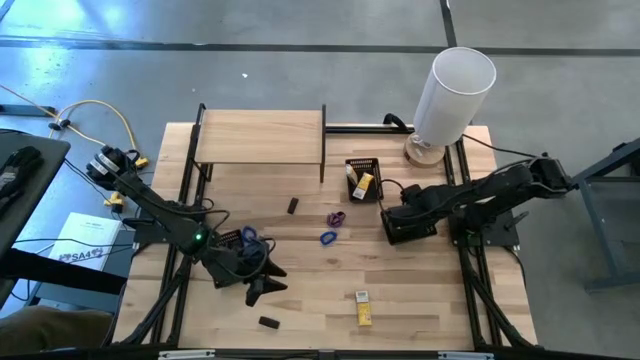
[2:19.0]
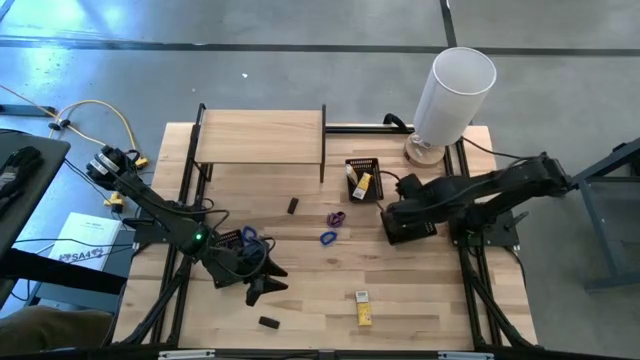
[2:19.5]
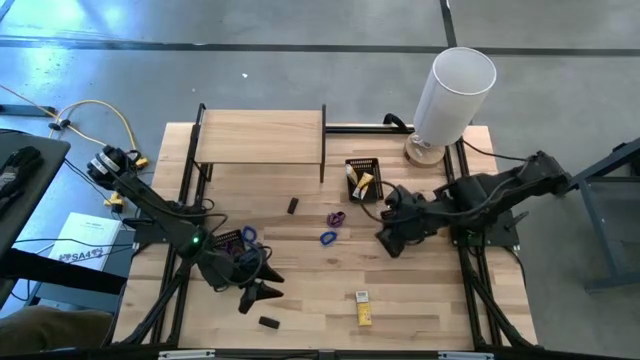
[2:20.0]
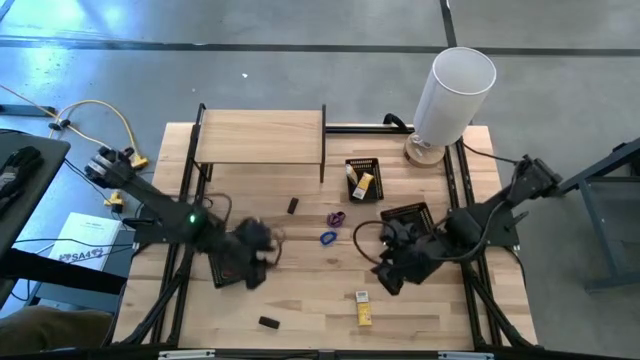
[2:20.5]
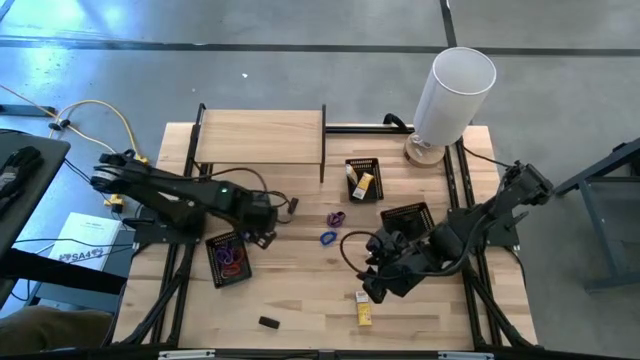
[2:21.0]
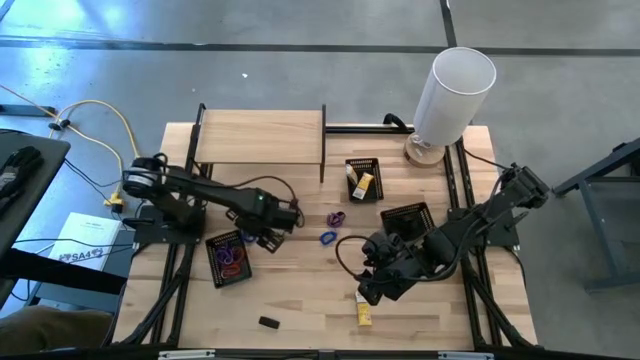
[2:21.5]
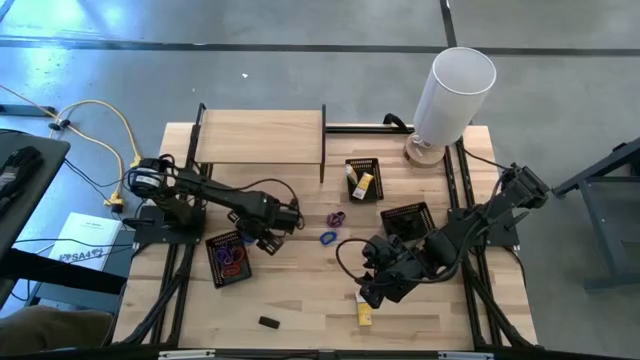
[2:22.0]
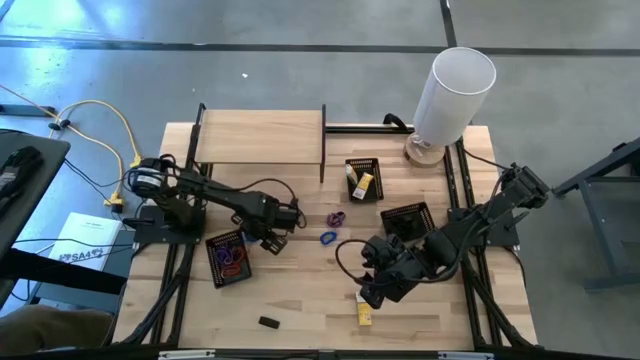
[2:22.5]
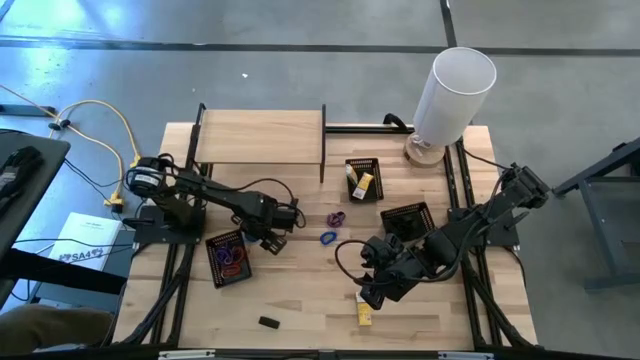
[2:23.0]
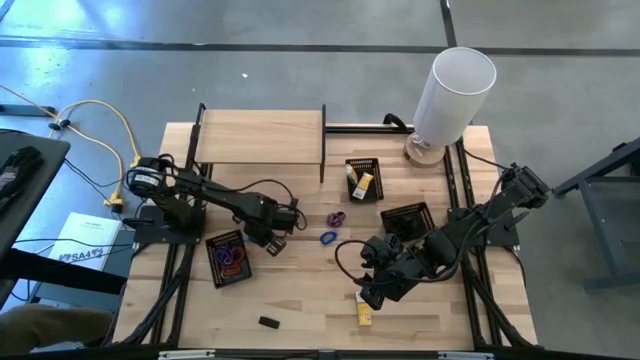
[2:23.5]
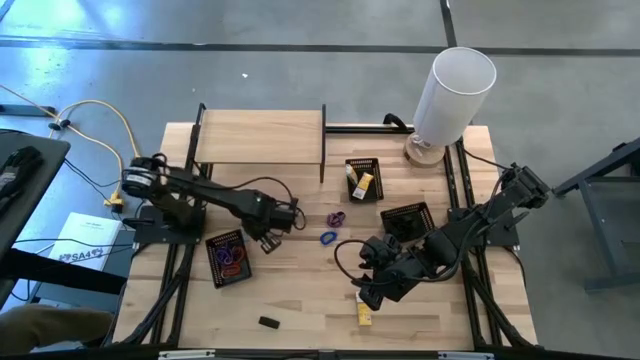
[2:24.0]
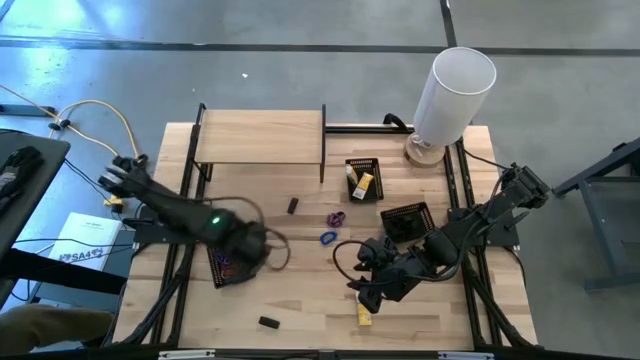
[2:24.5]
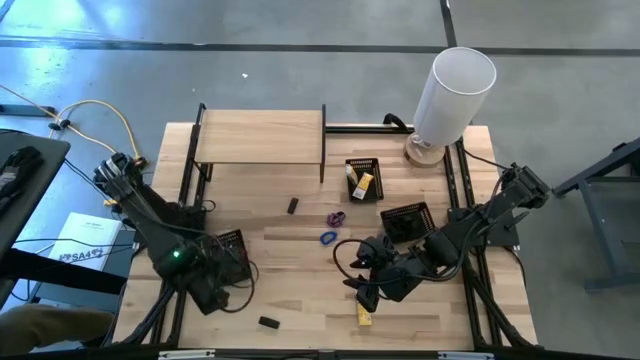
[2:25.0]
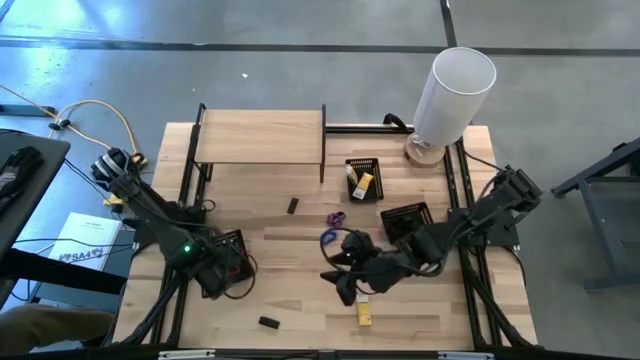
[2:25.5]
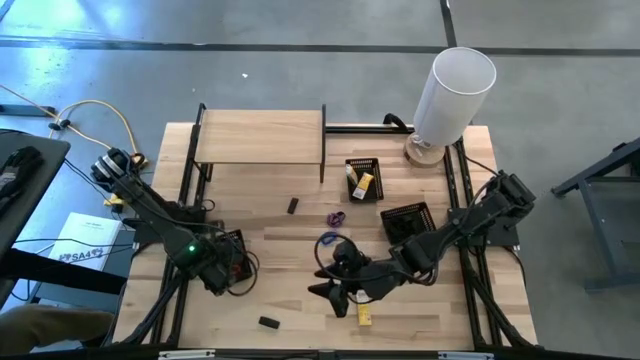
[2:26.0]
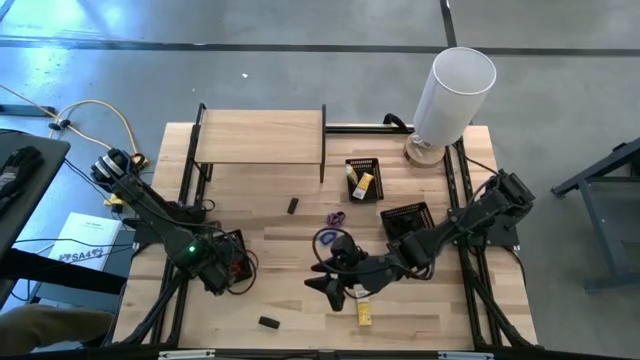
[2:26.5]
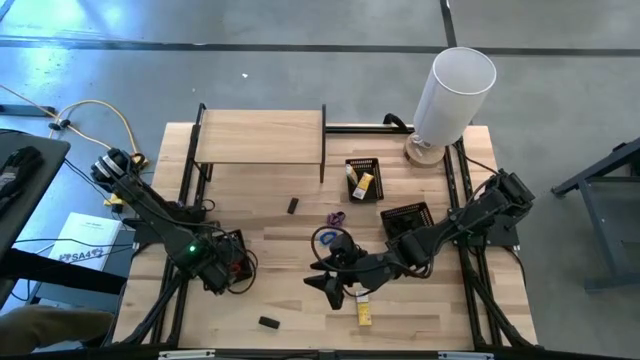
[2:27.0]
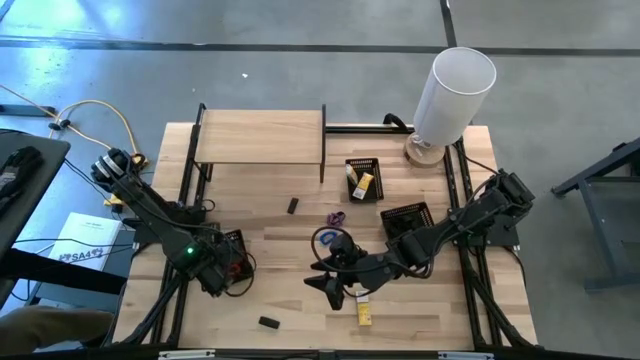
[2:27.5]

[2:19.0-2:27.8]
Task: Pick & Place Office Desk Supplies
Put the blue spring keychain into the bottom left black bin

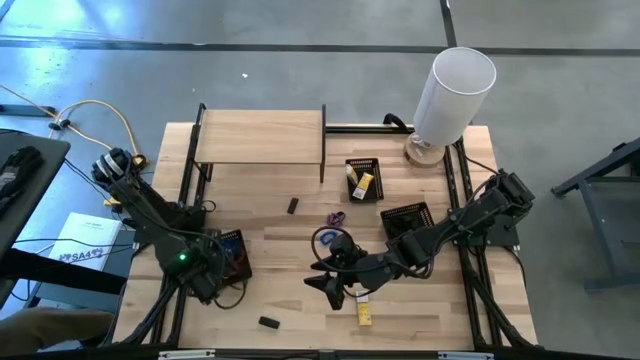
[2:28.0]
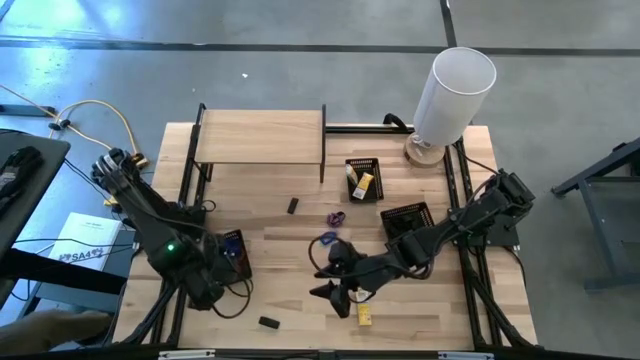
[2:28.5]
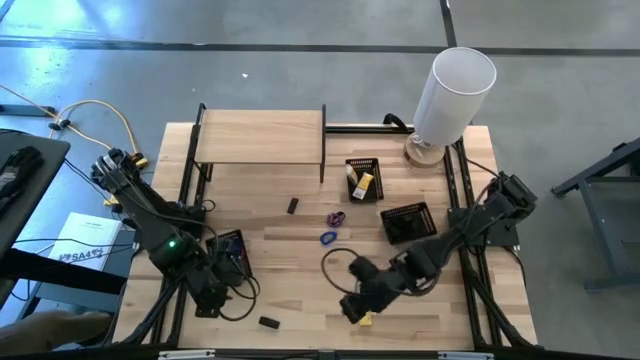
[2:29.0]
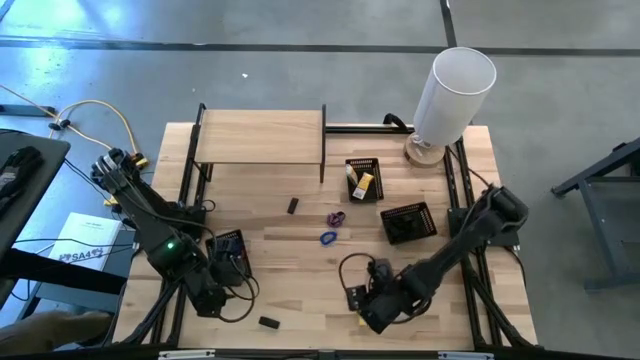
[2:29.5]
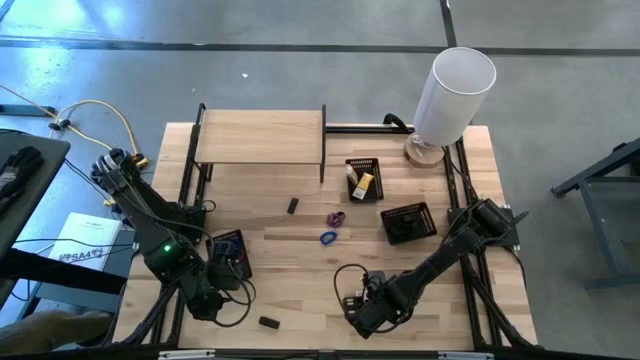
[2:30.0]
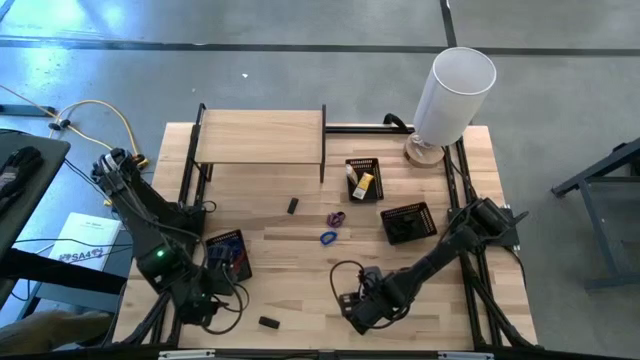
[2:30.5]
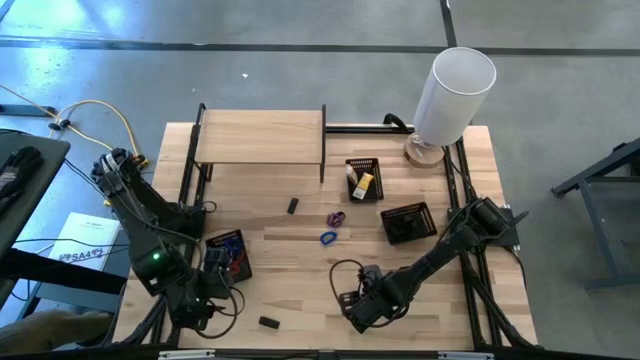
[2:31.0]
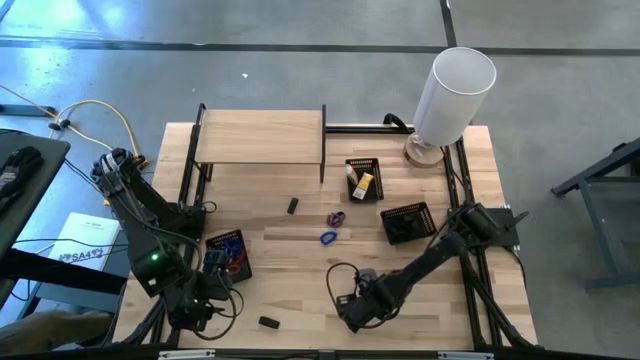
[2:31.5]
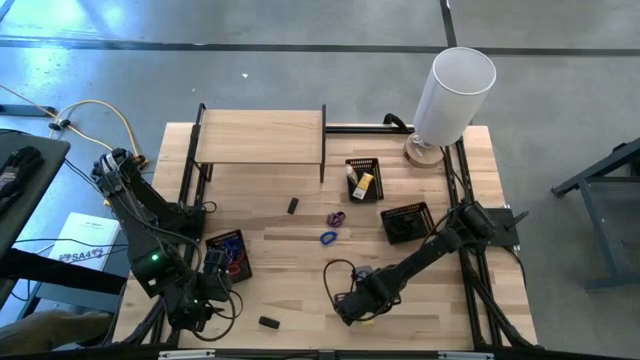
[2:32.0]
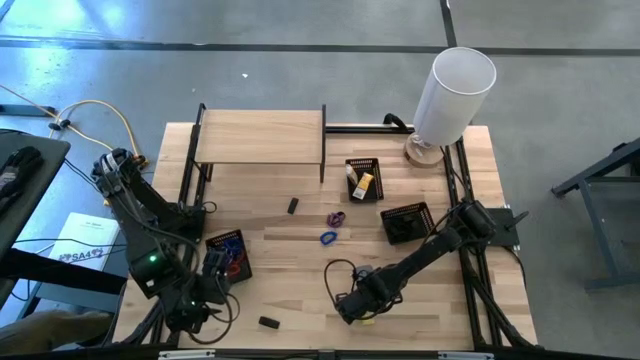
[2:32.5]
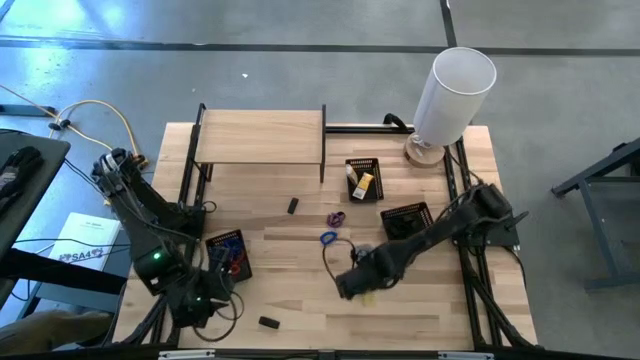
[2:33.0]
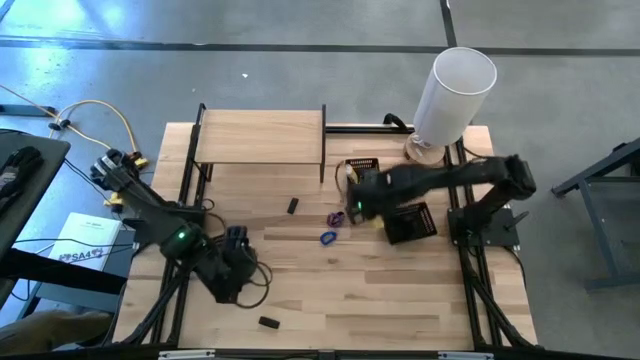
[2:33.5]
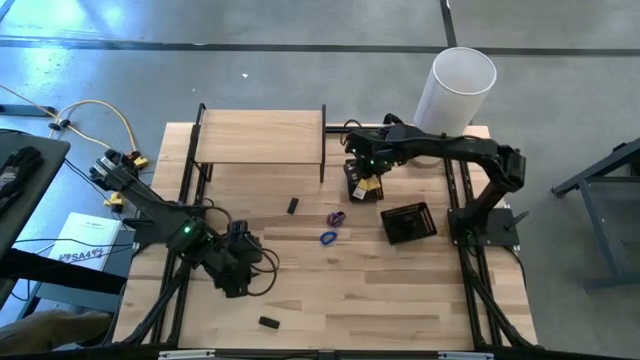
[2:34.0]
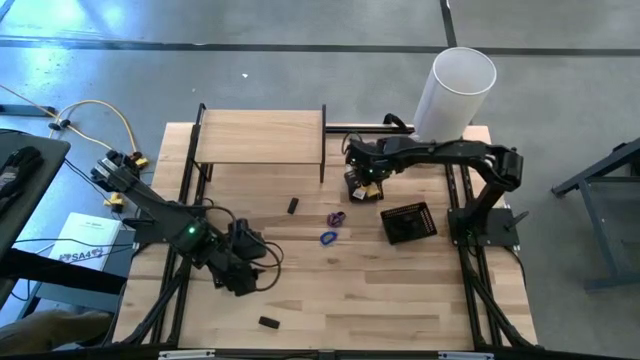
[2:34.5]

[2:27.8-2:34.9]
Put the crayon box into the top black bin

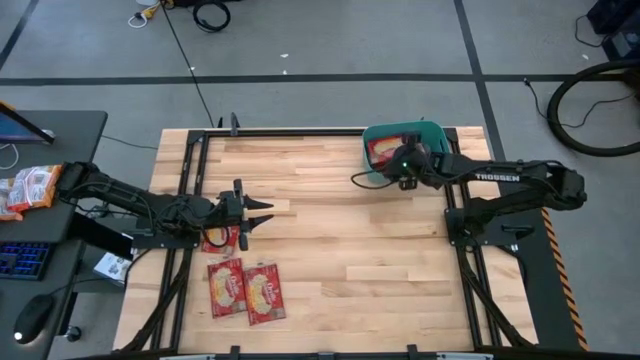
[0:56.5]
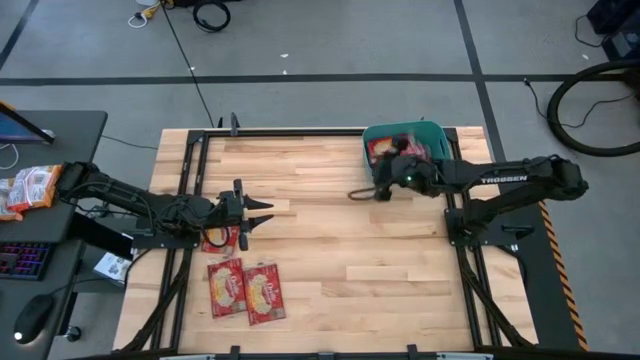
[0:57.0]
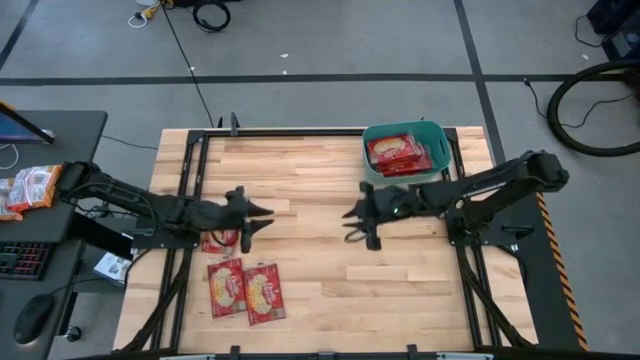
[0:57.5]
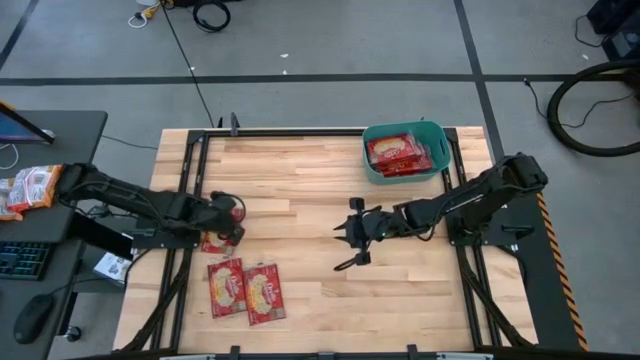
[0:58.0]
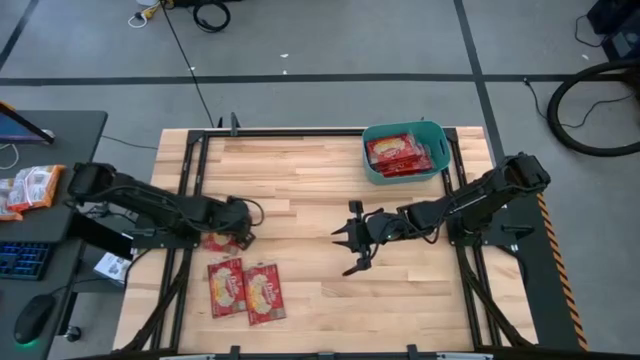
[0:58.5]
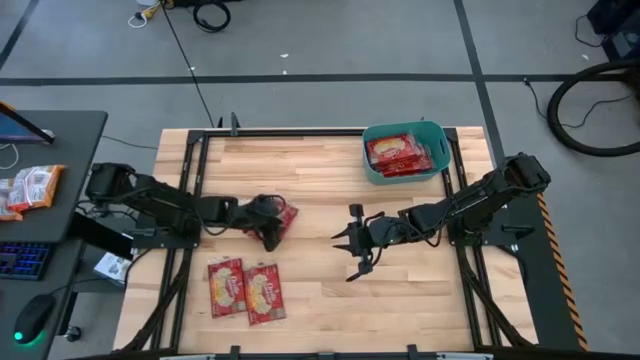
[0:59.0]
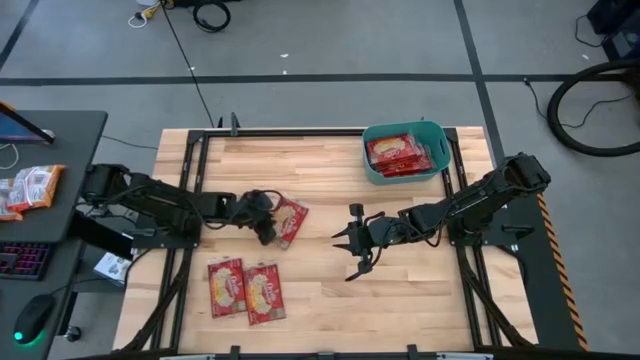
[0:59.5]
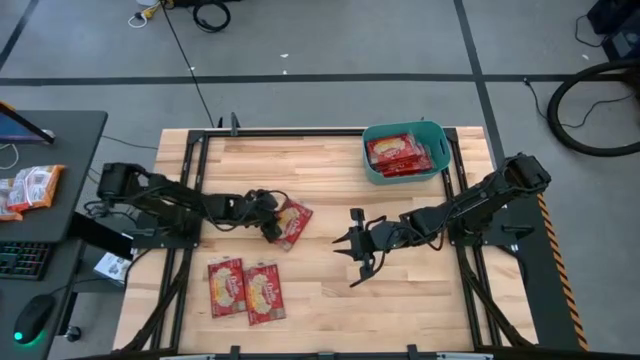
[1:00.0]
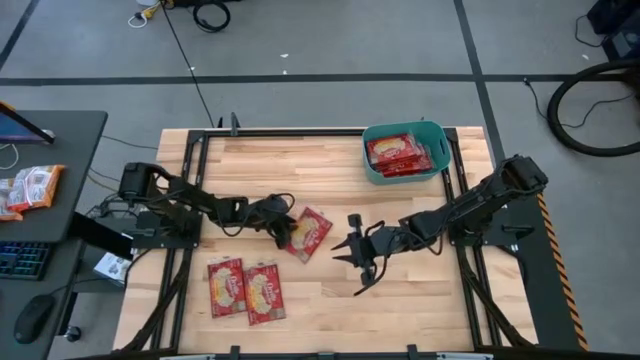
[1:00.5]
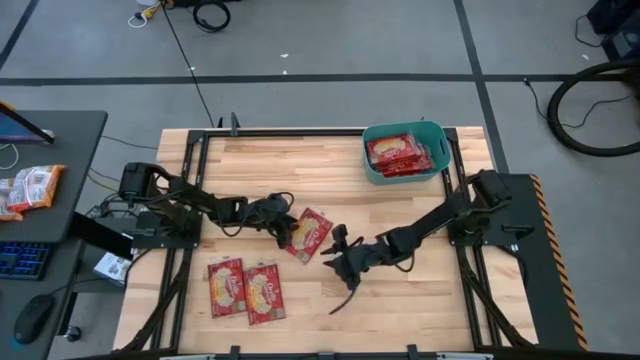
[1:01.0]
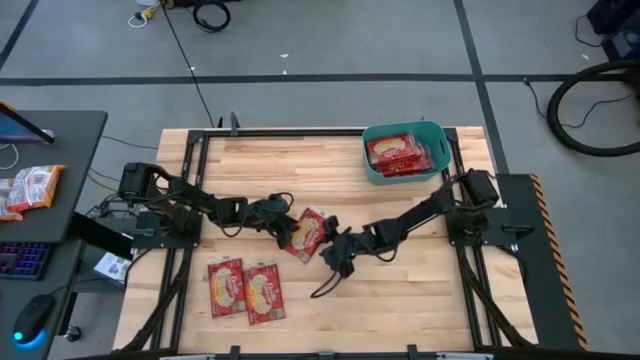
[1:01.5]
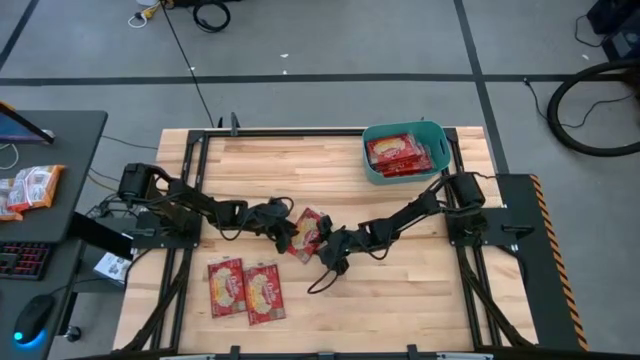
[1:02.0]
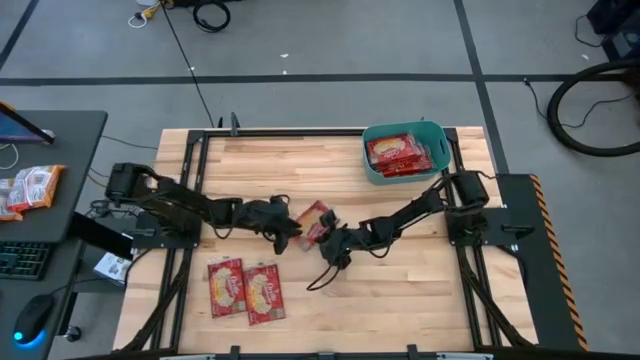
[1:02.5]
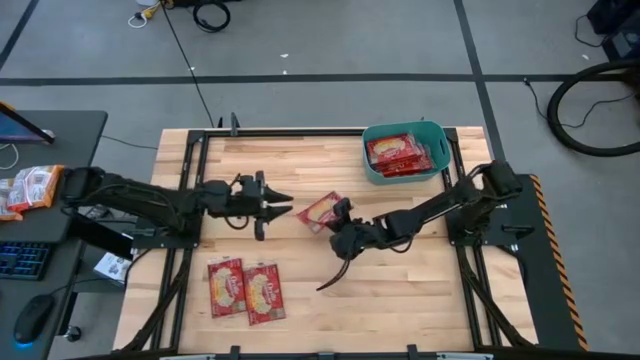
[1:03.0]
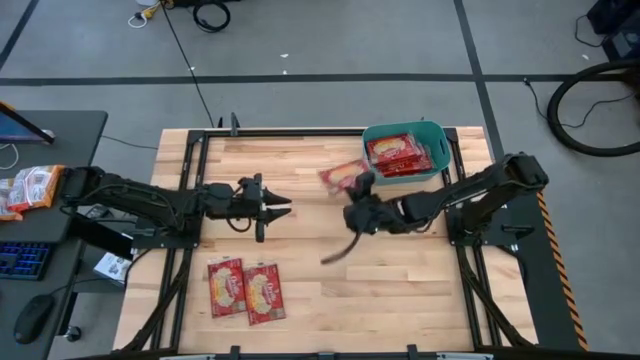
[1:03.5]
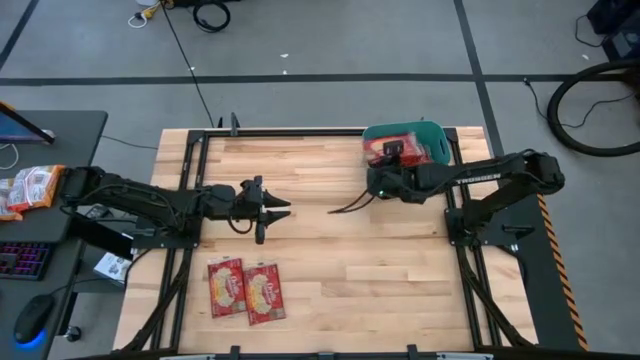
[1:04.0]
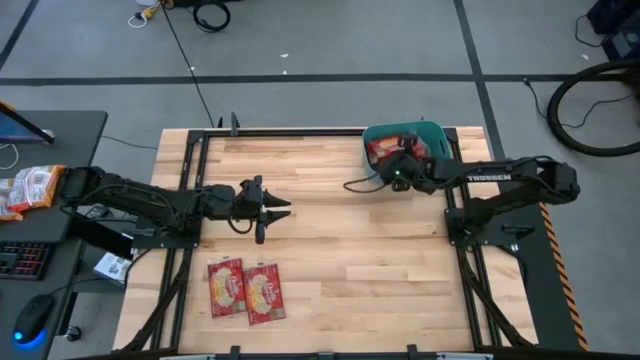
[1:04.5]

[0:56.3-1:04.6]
Task: Sort popcorn bags into baskets
Put the red popcorn bag into the green bin
